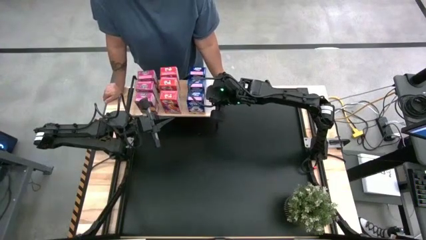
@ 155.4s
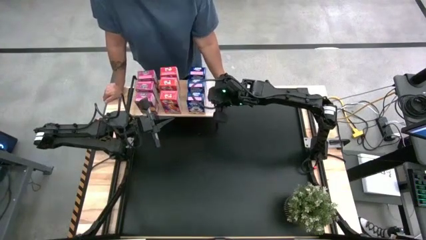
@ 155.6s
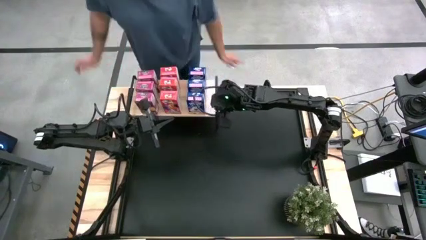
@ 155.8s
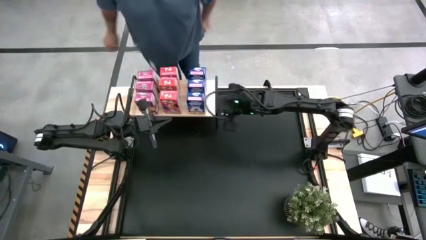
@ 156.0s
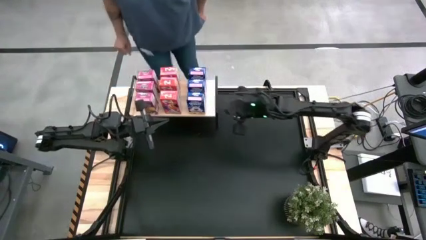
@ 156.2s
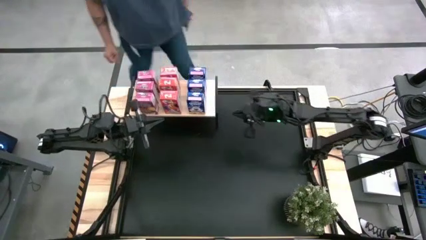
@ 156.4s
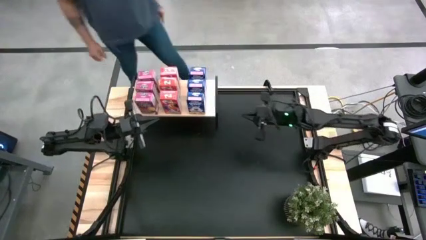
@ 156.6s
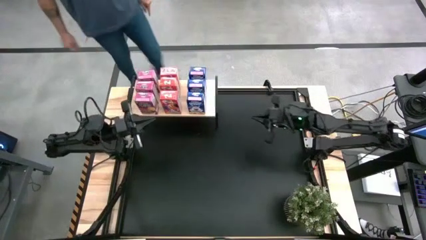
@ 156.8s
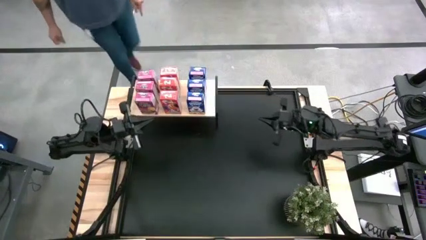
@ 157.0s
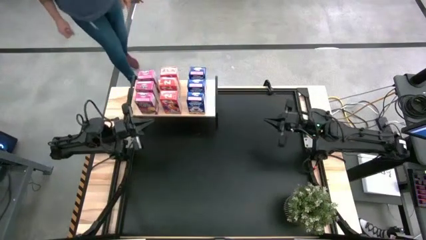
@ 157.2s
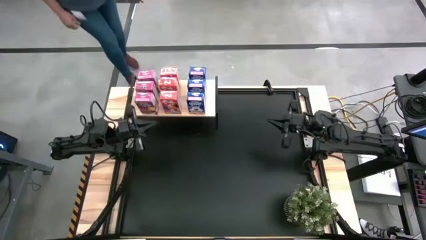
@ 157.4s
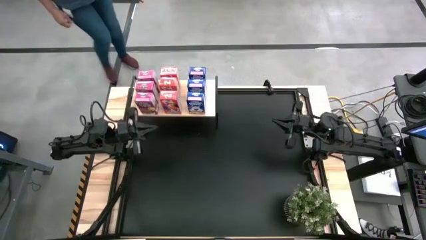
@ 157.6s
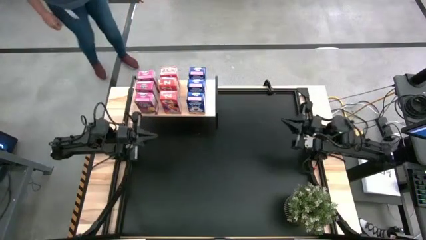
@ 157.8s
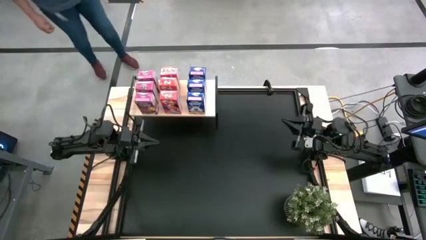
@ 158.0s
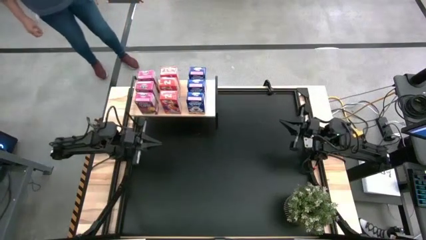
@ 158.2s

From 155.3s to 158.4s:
Task: Stack cereal on shelf
Return to Home Position

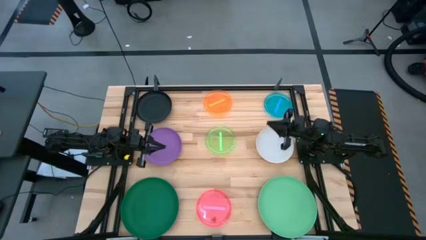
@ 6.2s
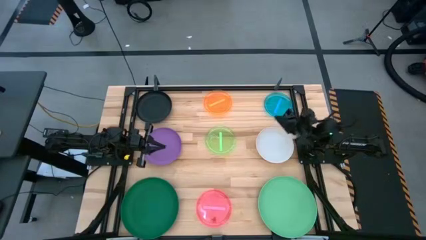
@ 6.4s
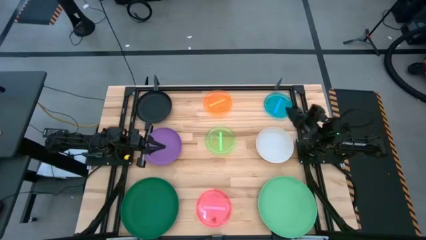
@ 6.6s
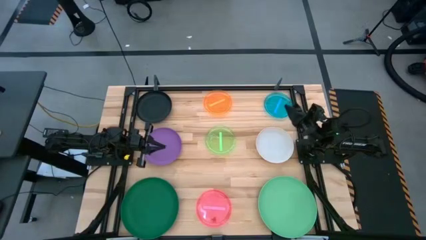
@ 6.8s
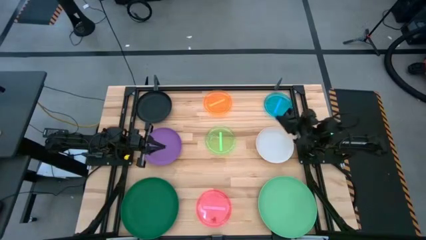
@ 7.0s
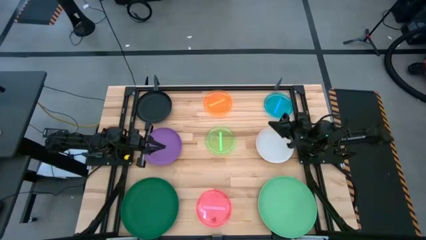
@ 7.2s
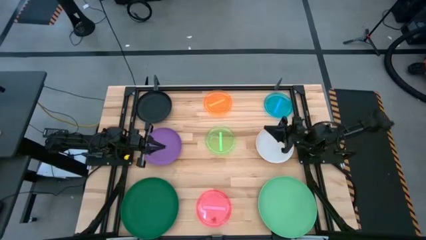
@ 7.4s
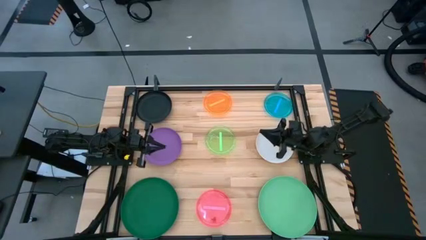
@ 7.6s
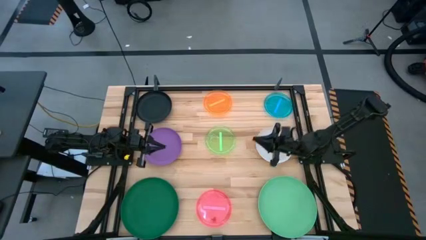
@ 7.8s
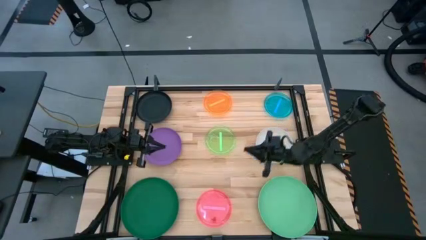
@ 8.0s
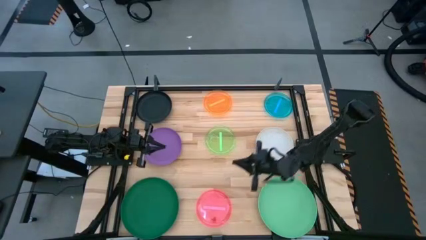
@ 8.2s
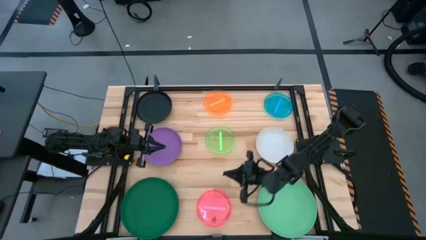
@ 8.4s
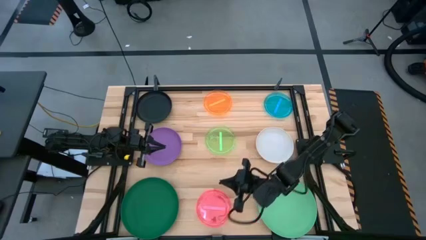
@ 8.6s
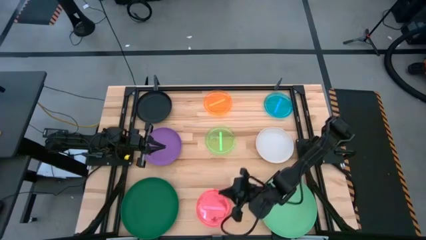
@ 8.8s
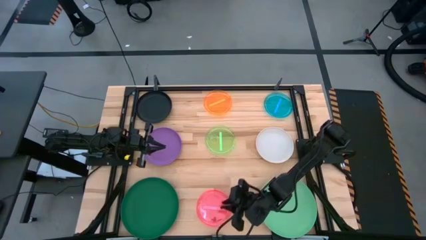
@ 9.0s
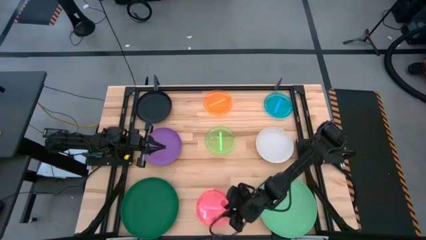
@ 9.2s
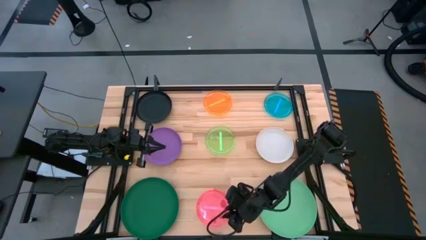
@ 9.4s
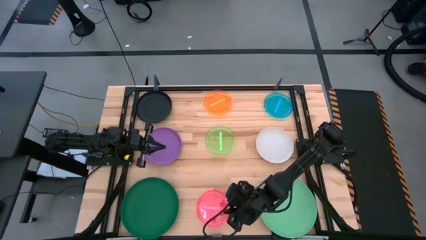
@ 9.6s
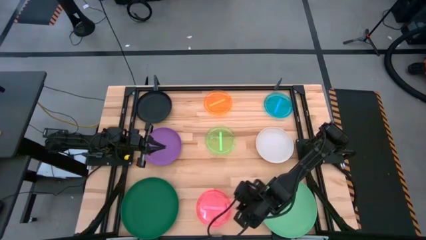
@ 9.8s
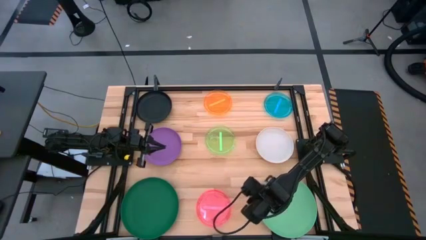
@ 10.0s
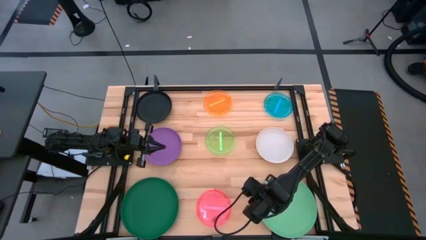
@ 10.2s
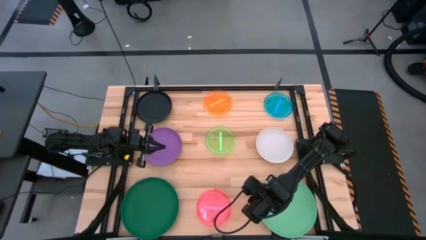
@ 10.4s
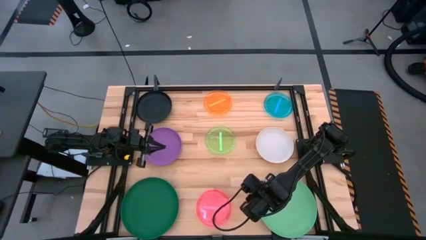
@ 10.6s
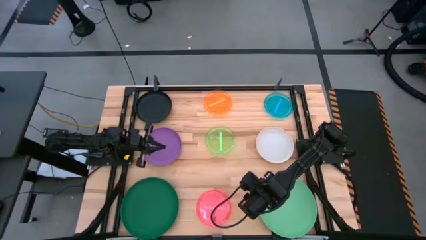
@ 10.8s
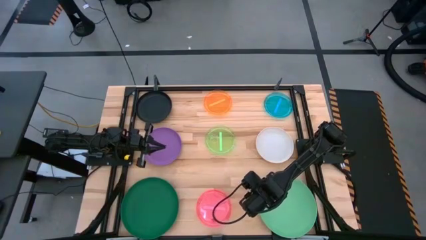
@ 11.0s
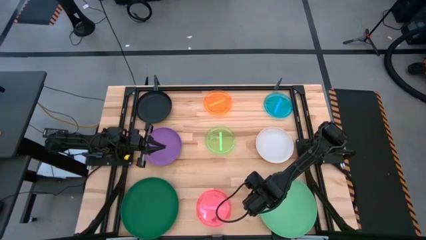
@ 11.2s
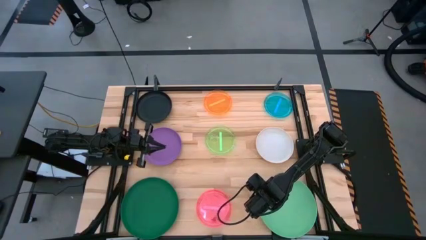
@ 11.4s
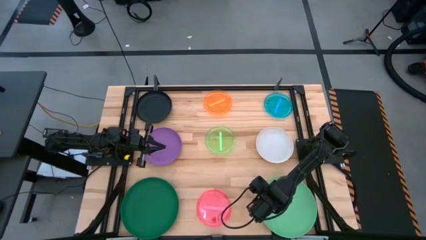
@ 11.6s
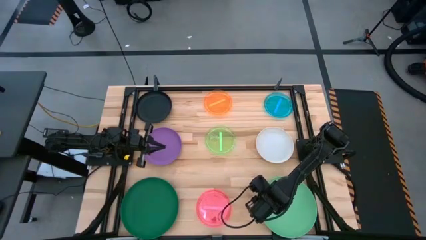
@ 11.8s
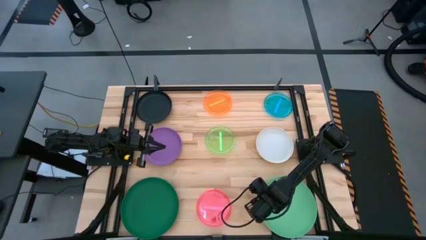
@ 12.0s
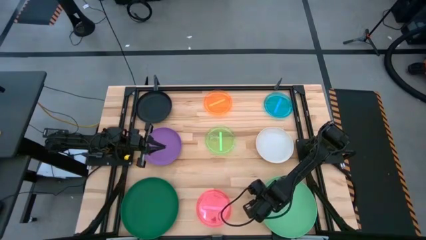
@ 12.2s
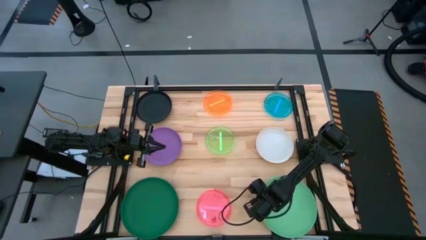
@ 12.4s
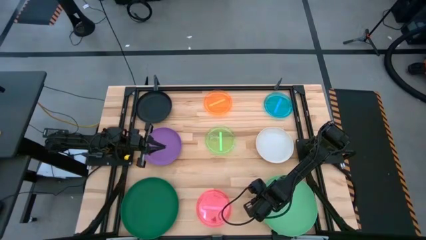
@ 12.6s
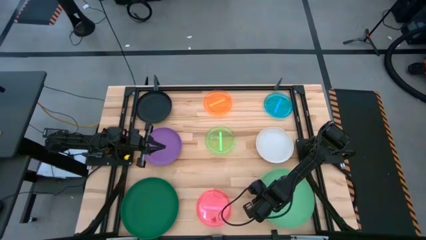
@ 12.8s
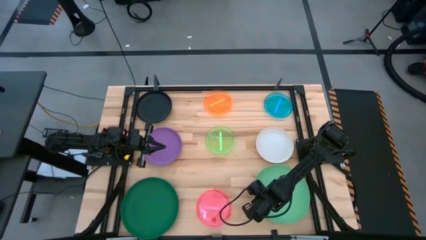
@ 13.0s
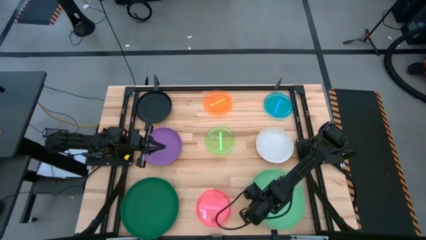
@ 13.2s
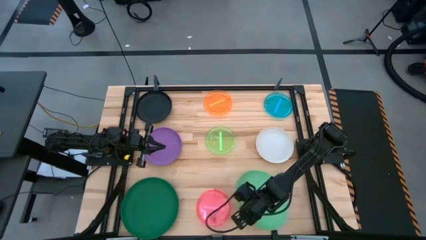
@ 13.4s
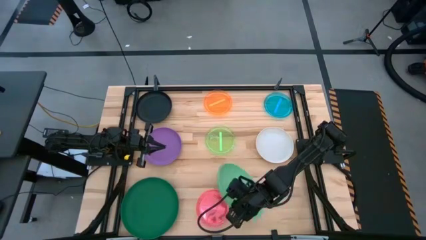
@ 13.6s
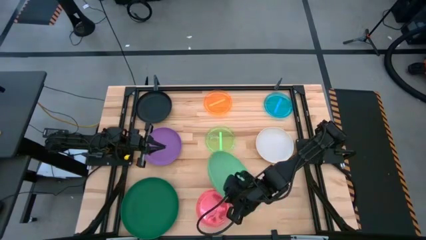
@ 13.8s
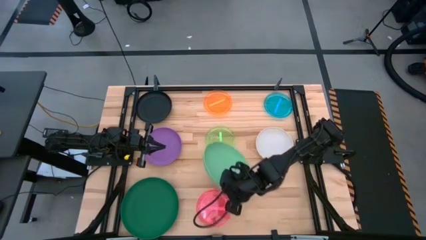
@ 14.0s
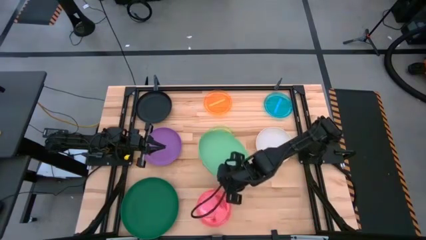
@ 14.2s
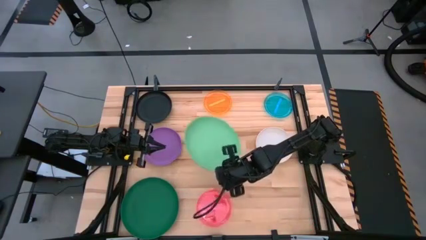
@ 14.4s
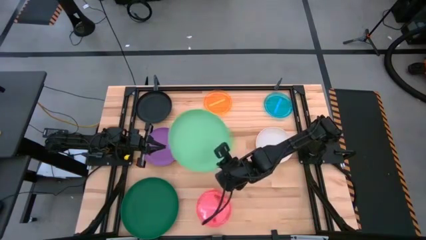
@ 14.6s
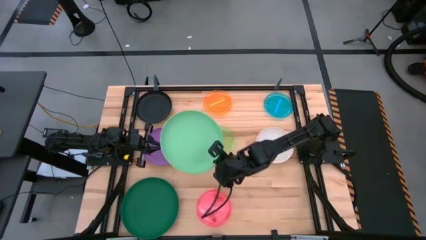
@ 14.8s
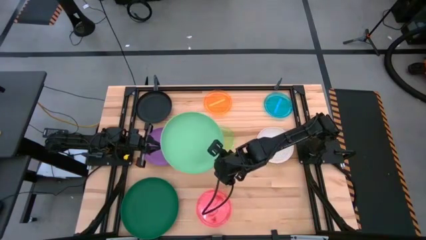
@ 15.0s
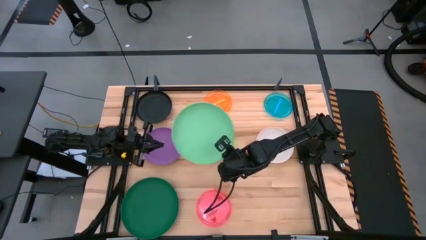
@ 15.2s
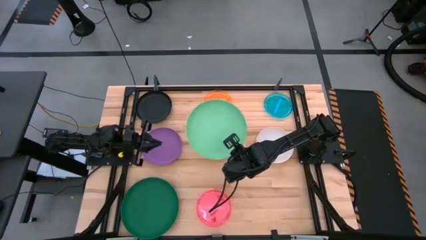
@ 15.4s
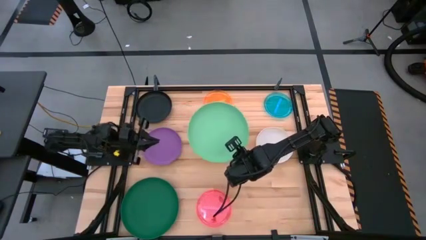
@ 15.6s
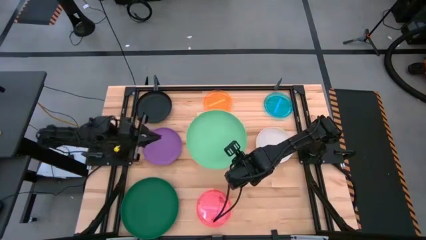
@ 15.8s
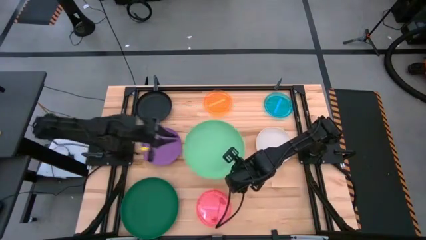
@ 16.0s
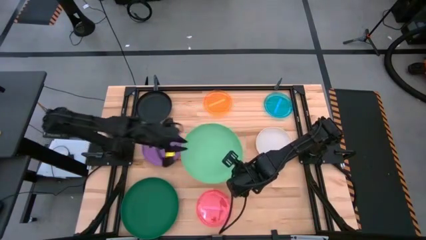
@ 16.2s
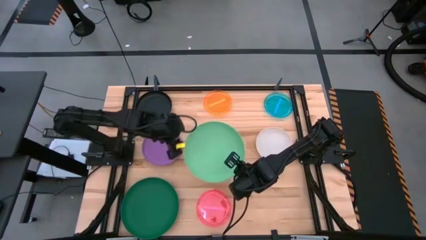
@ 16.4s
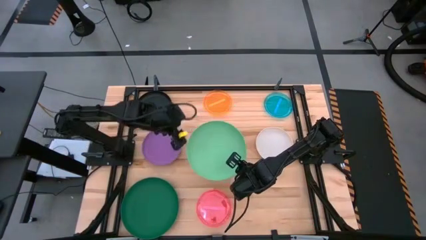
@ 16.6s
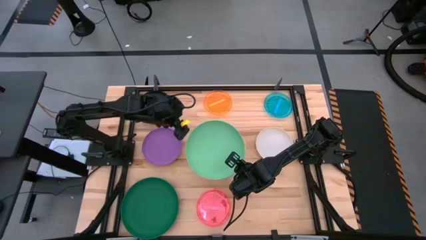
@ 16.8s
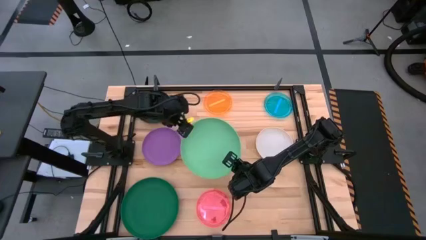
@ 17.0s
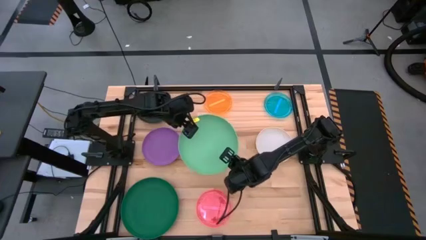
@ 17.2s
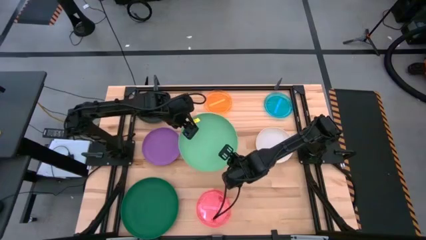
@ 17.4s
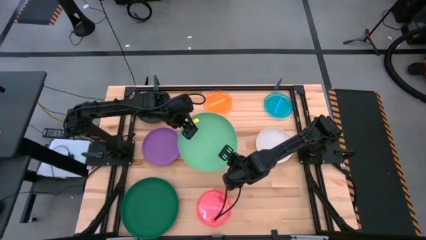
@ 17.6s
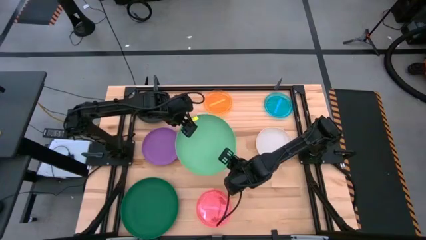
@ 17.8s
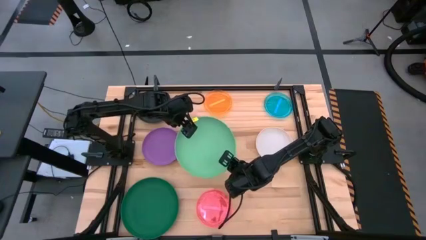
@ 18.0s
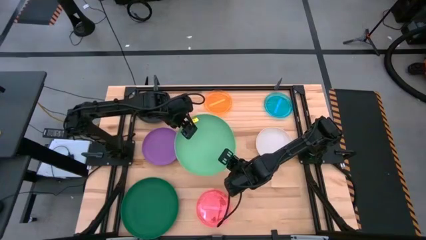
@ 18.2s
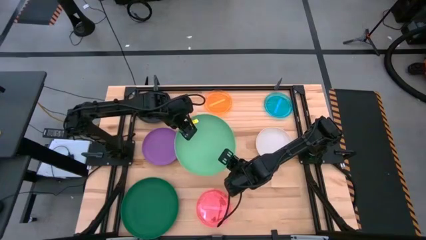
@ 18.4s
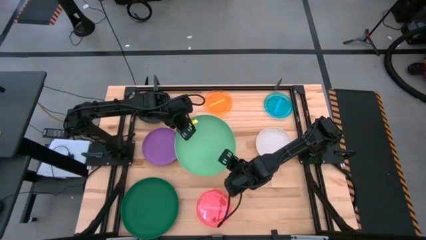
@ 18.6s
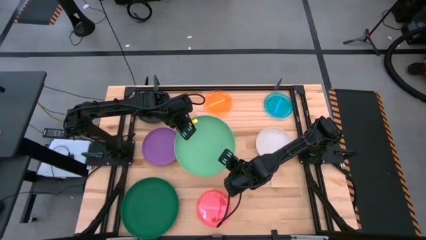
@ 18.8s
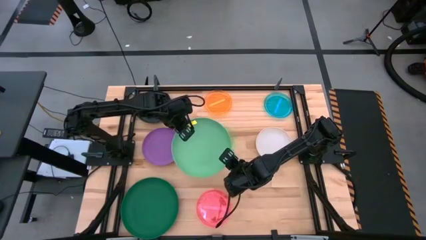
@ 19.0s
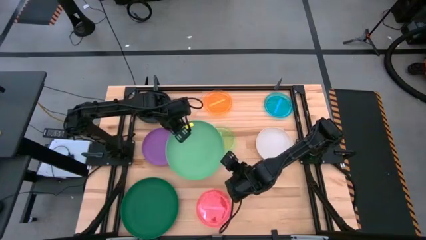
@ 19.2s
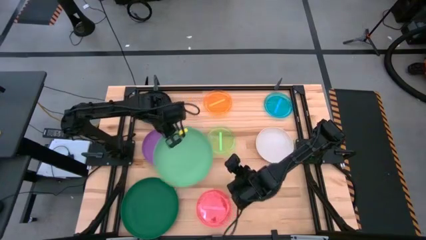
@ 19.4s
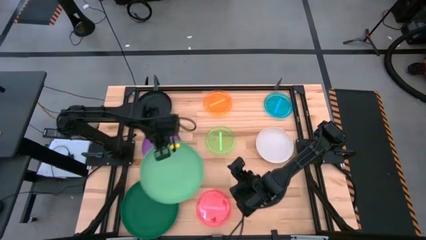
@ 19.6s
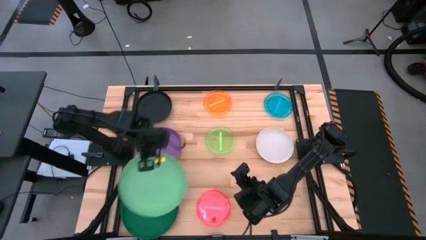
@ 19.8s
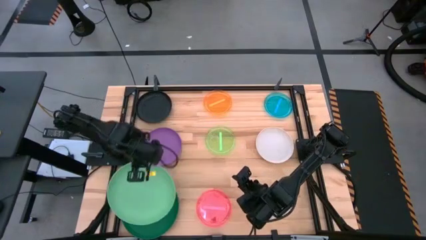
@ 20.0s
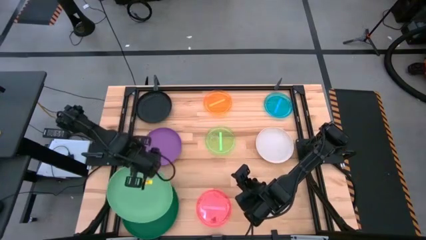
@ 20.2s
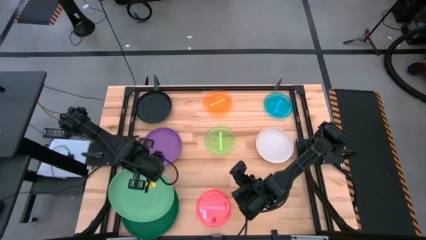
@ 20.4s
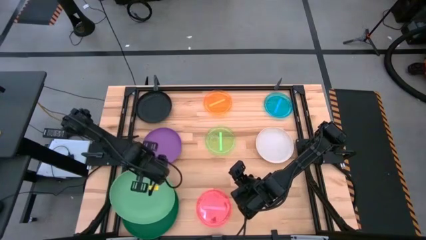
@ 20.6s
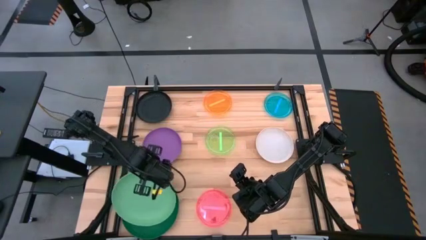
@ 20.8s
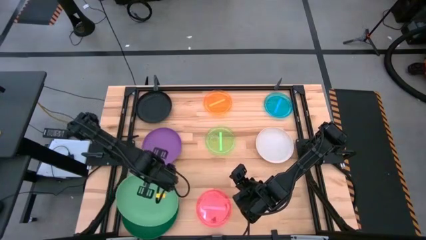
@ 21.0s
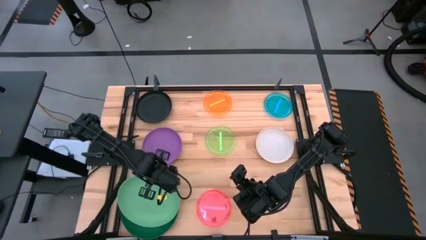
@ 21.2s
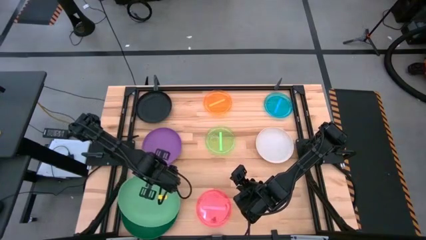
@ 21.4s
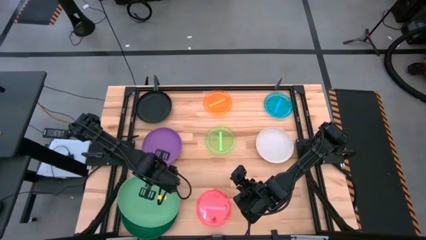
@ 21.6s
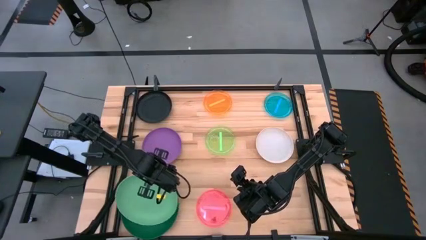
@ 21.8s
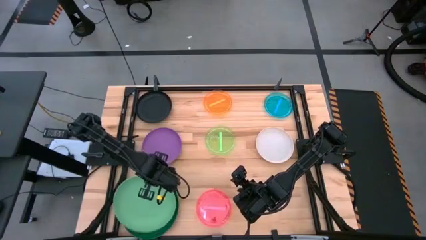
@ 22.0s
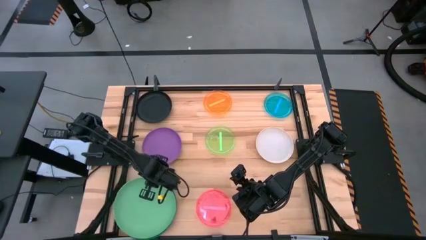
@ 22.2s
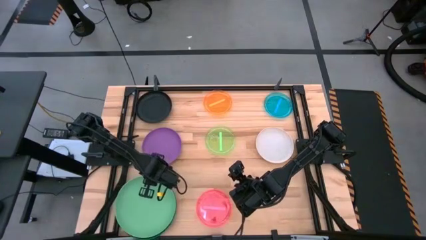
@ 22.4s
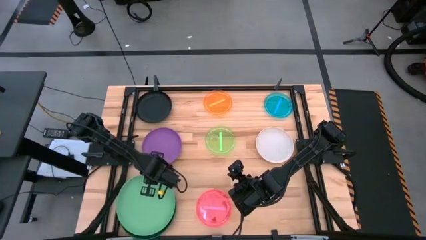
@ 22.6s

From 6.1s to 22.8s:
Task: Stack plastic plates
Stack the green plate on top of the dark green plate
